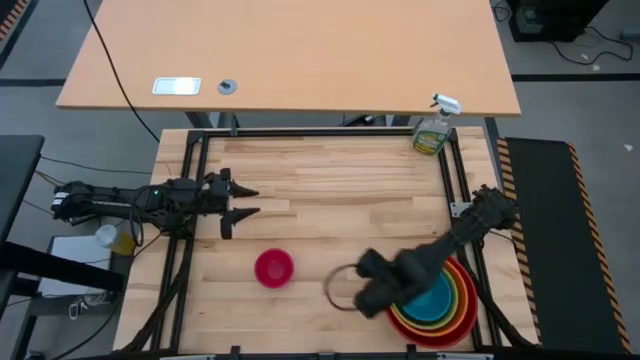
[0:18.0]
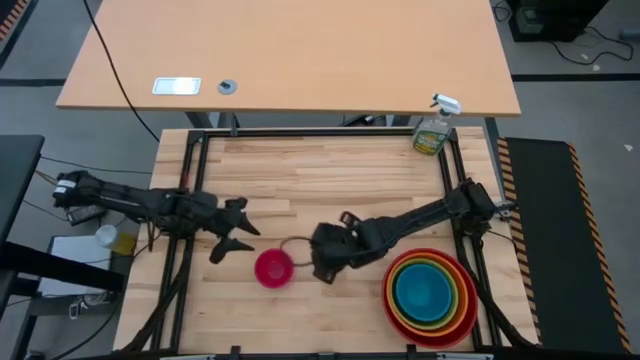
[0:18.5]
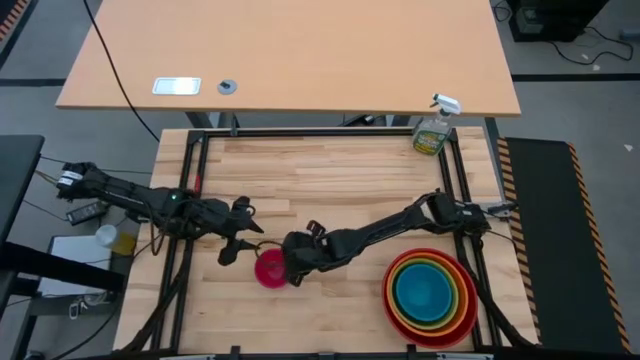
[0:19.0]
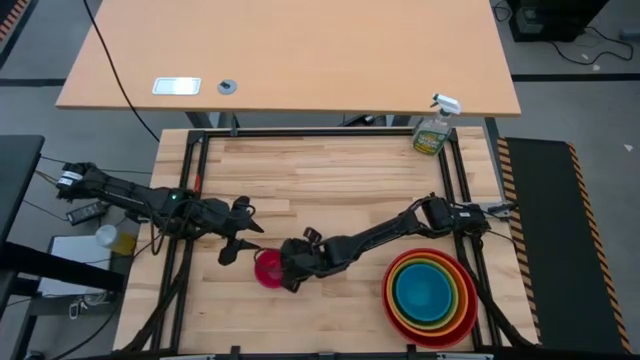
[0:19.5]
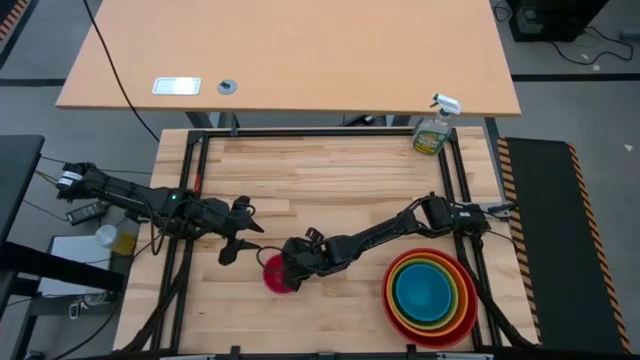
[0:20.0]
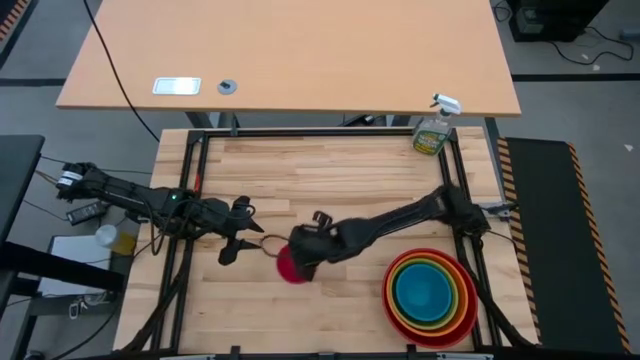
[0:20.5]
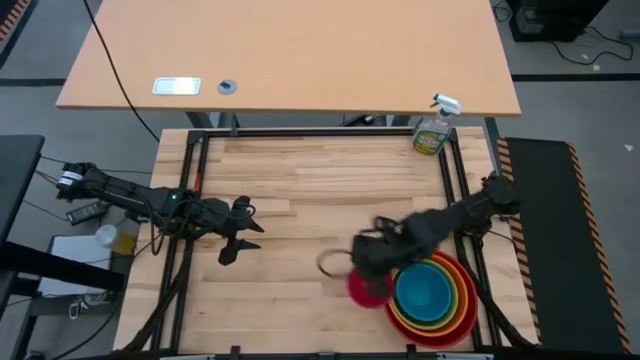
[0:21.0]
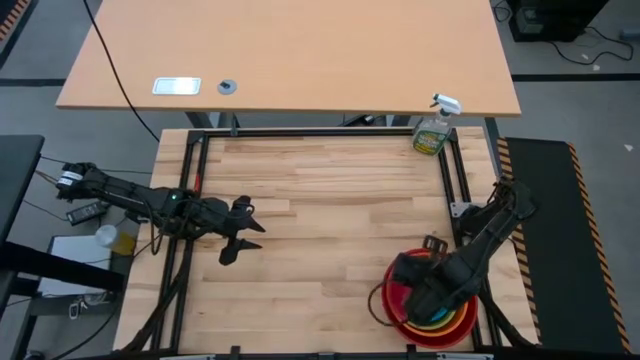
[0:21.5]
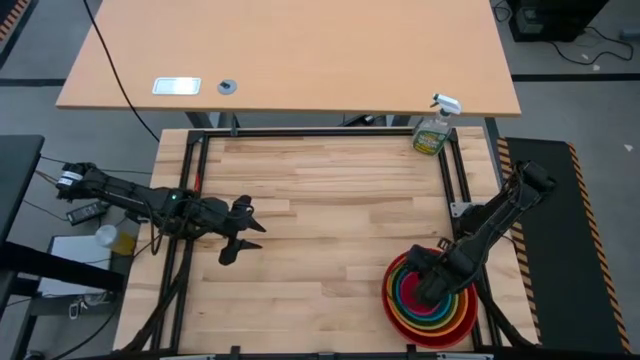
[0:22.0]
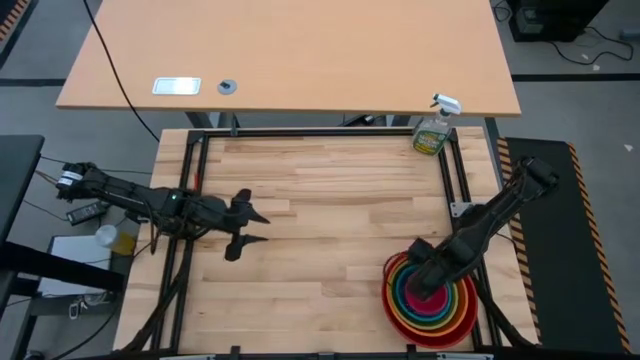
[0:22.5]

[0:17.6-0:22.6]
Stack the red bowl on top of the blue bowl

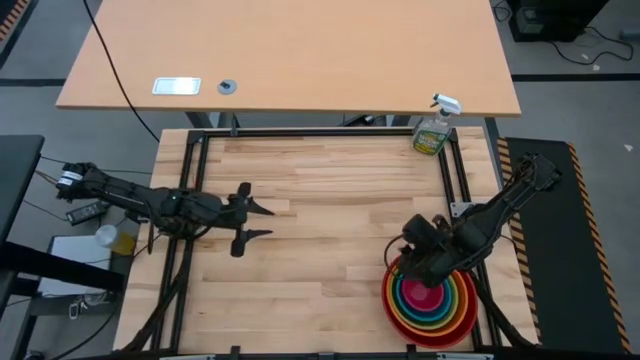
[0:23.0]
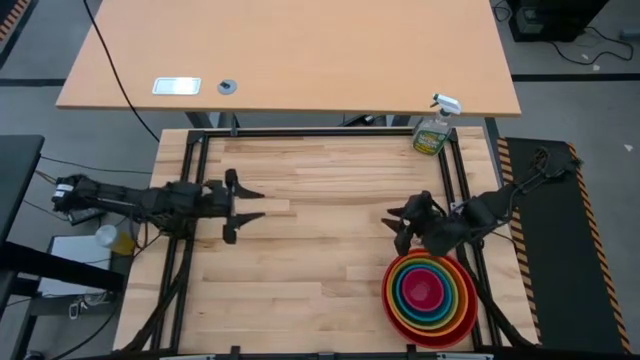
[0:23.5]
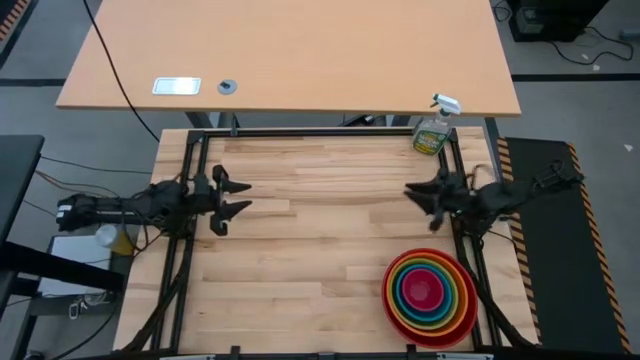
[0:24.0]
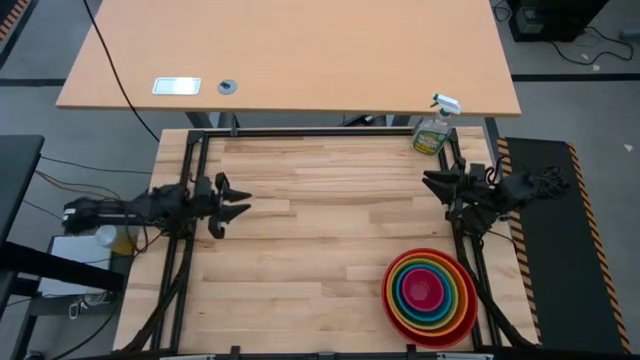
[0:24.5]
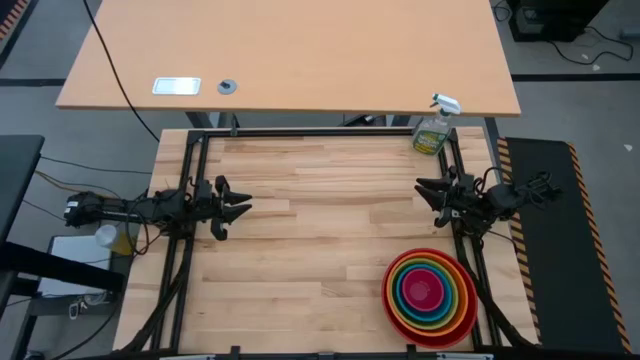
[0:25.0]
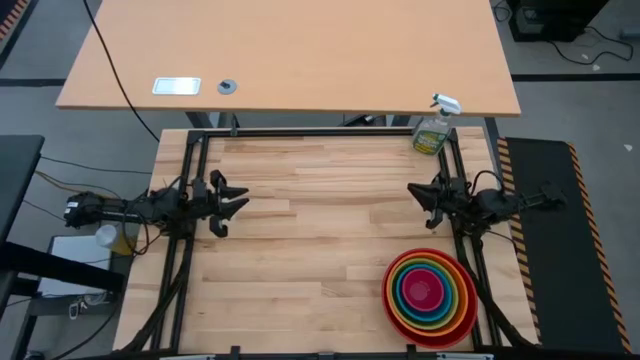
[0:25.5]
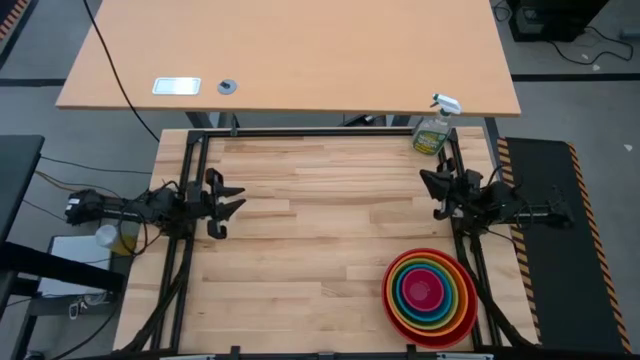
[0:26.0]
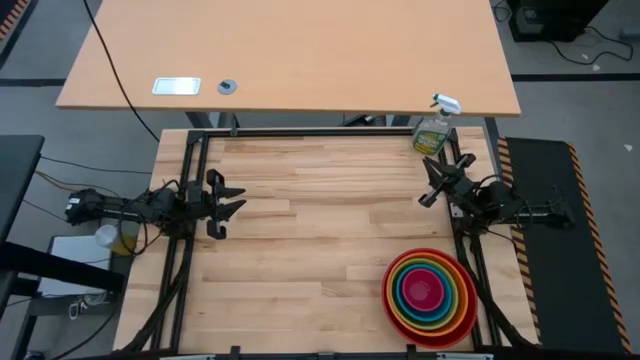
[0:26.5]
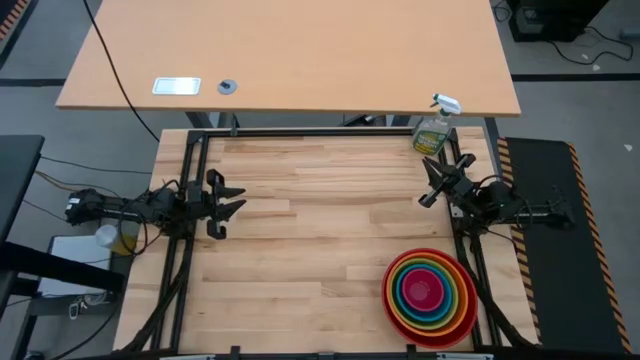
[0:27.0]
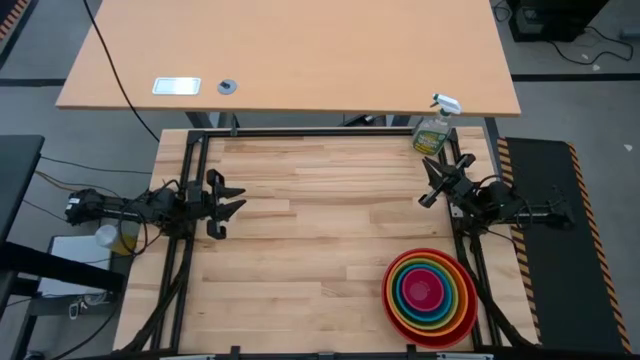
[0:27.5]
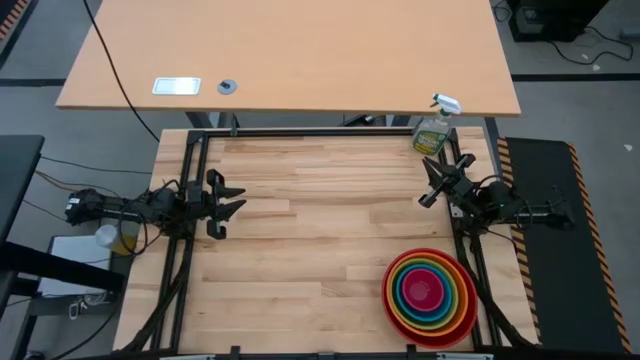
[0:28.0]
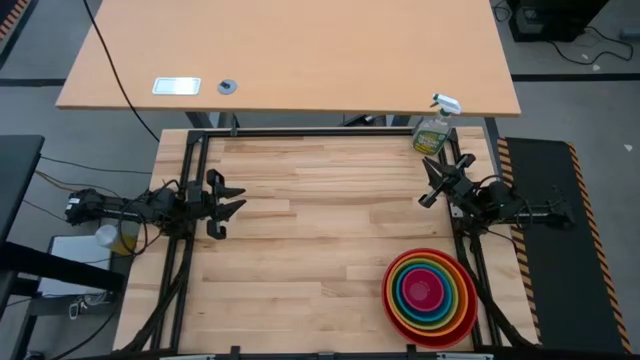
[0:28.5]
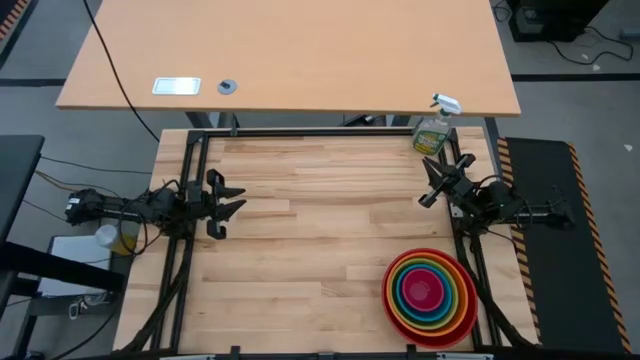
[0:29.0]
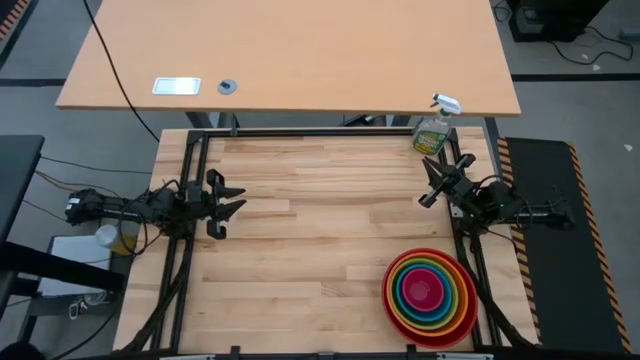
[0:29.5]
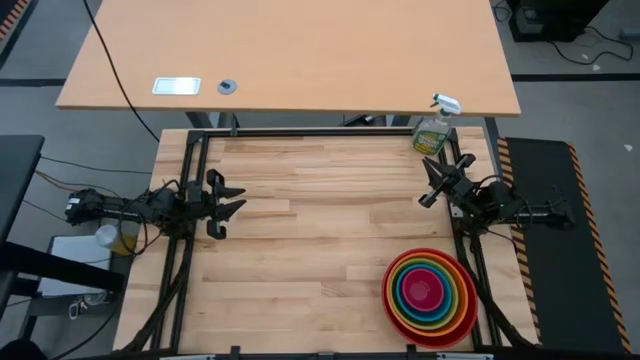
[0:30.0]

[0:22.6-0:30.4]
Return to Home Position
